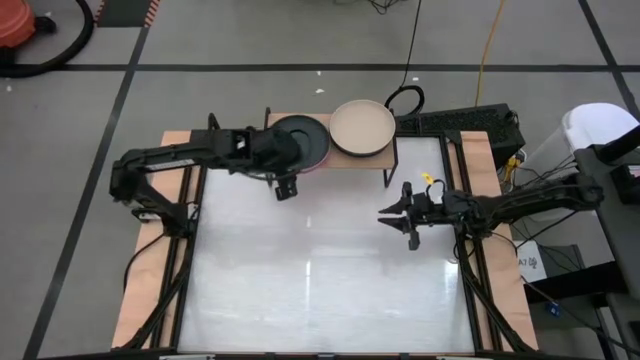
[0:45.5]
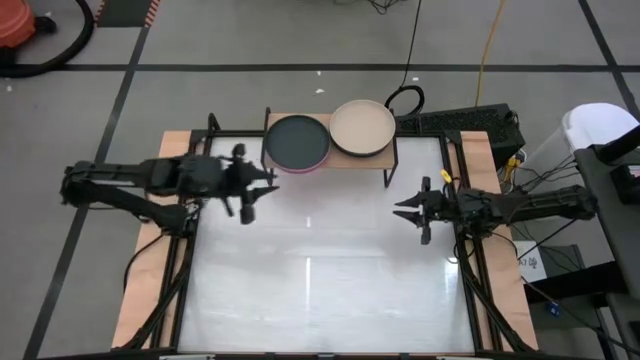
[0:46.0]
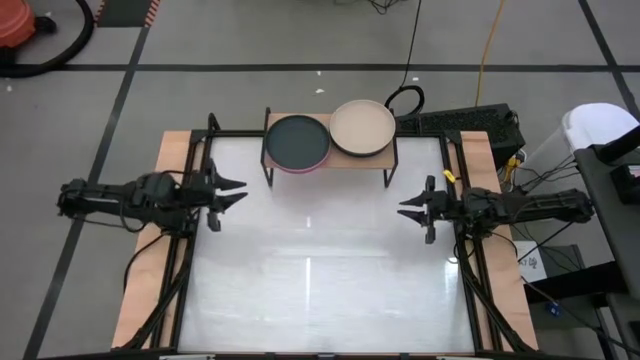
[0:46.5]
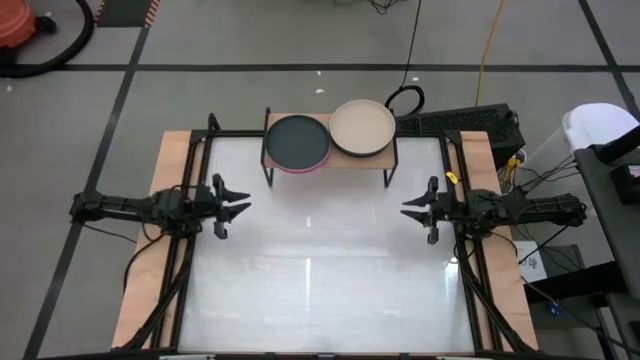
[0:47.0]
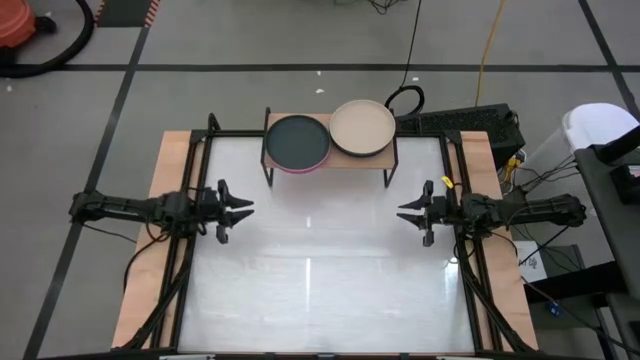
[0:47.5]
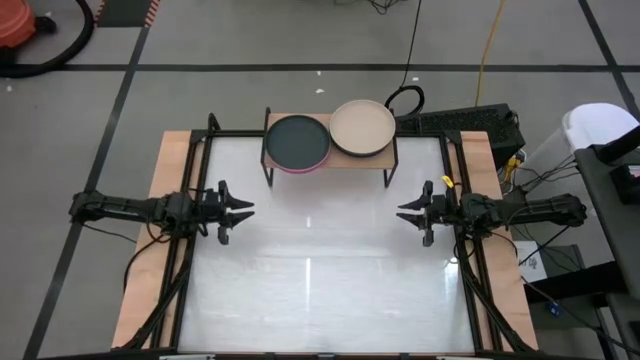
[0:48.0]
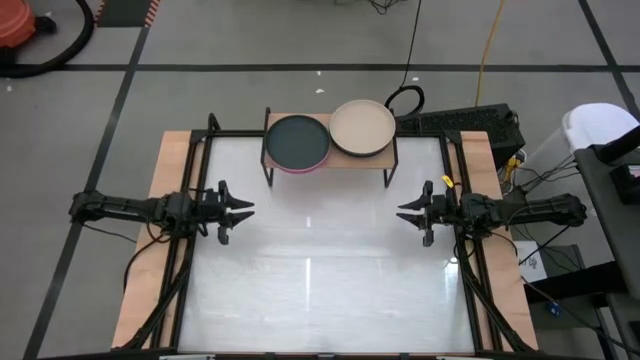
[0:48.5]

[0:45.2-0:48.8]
Task: Place and stack plates onto a shelf
Return to Home Position

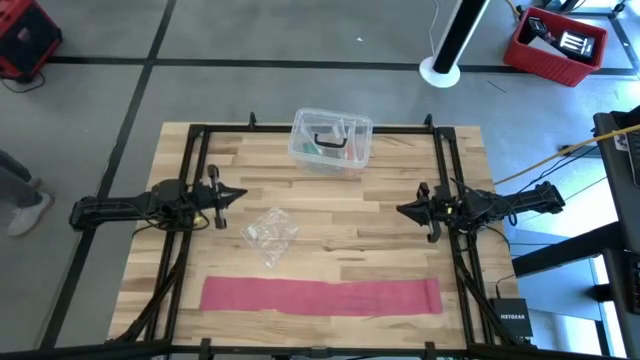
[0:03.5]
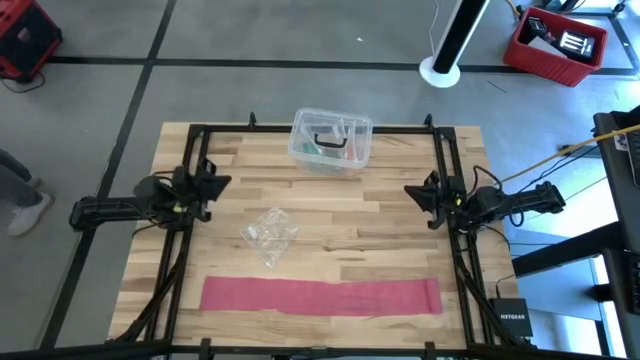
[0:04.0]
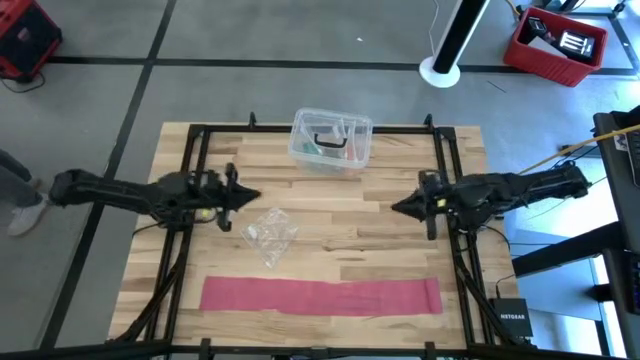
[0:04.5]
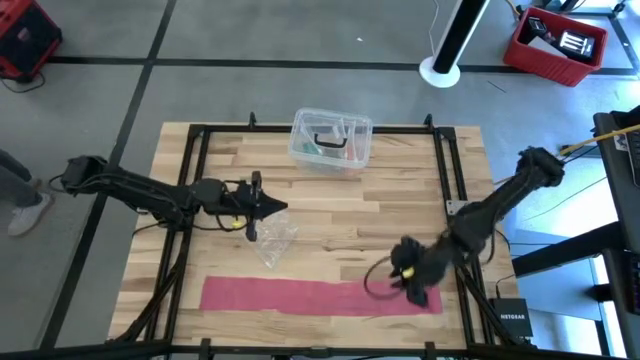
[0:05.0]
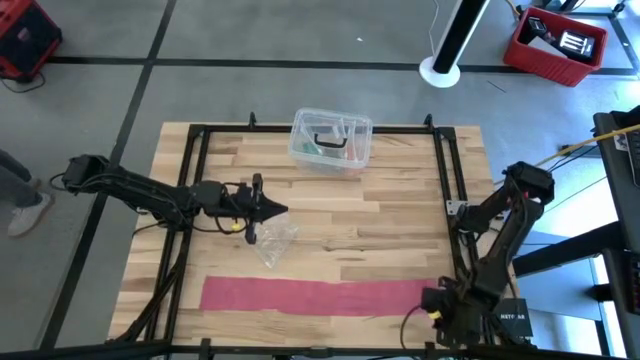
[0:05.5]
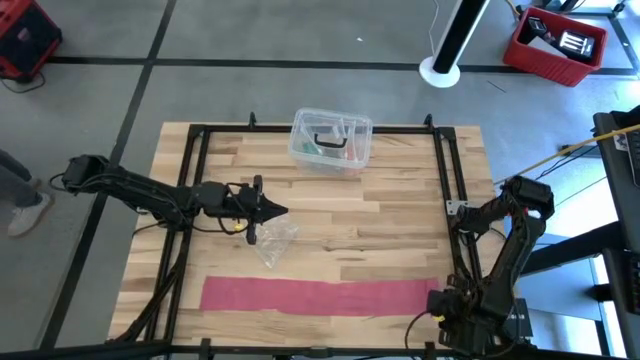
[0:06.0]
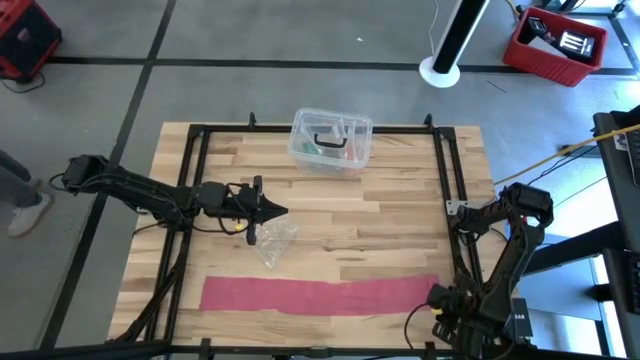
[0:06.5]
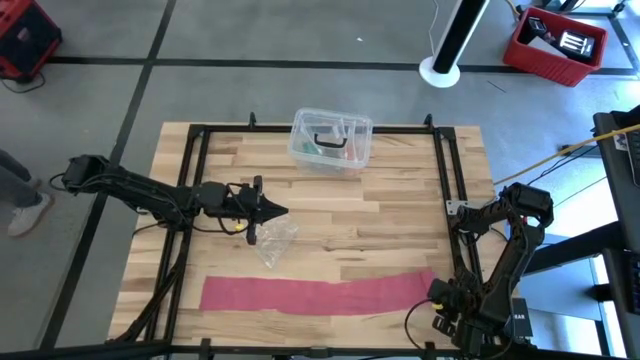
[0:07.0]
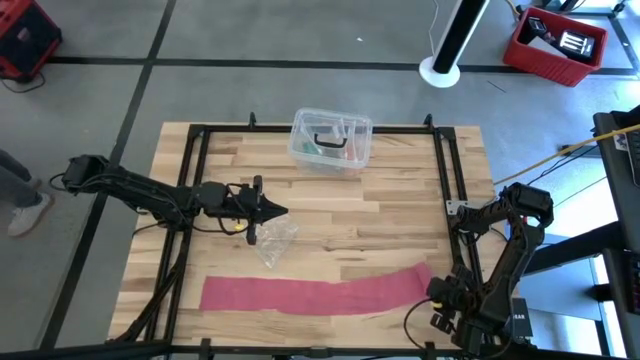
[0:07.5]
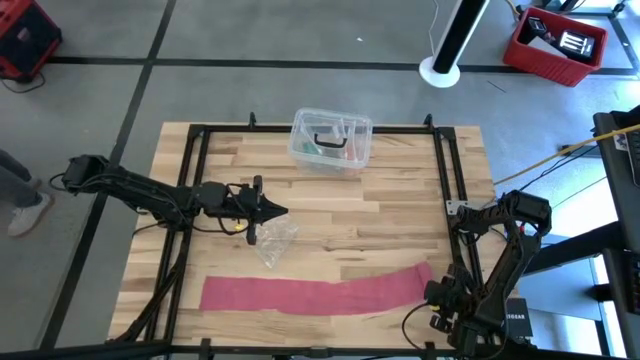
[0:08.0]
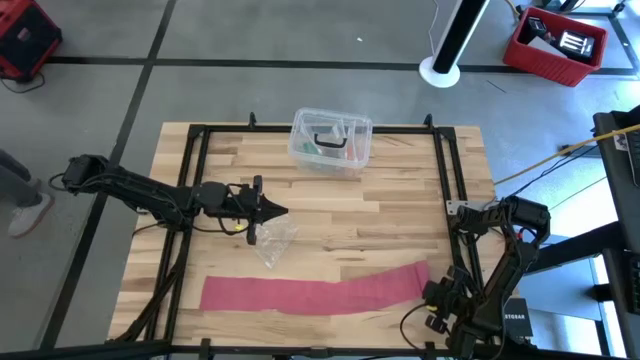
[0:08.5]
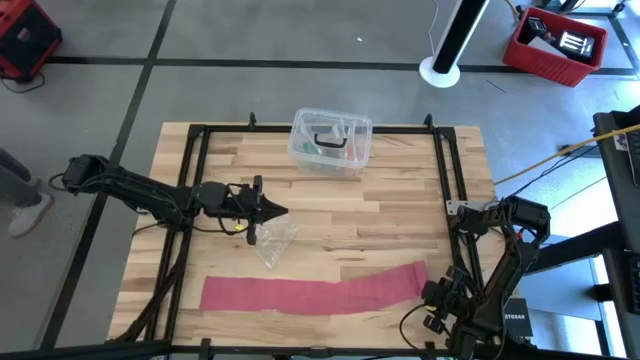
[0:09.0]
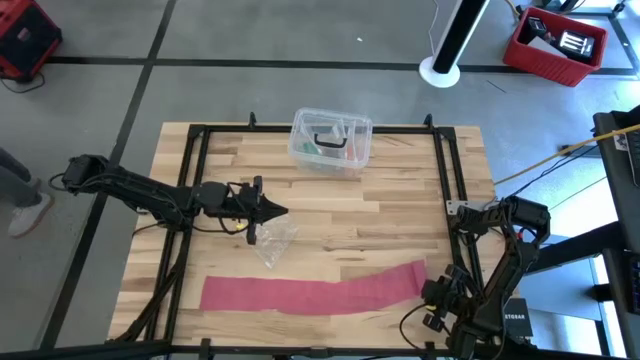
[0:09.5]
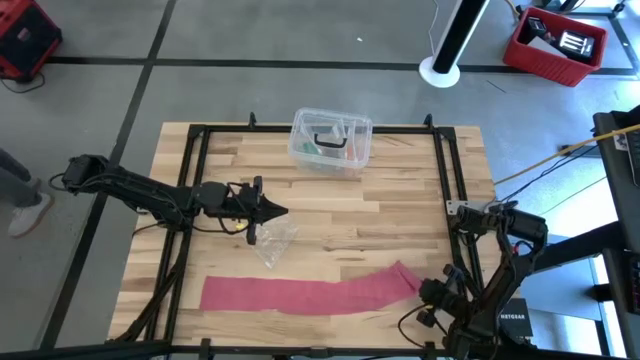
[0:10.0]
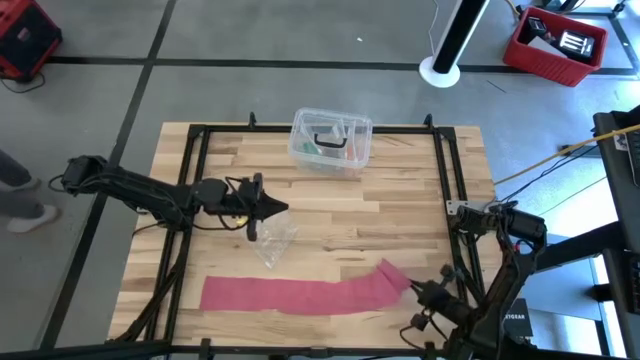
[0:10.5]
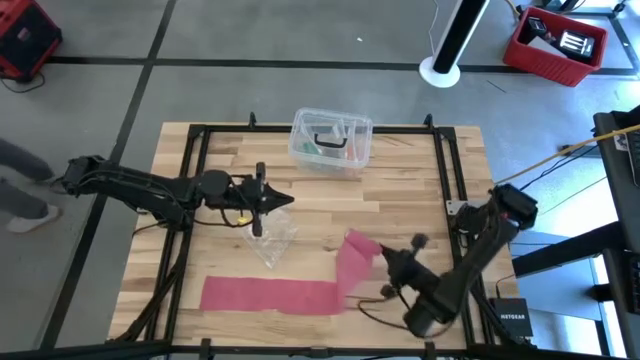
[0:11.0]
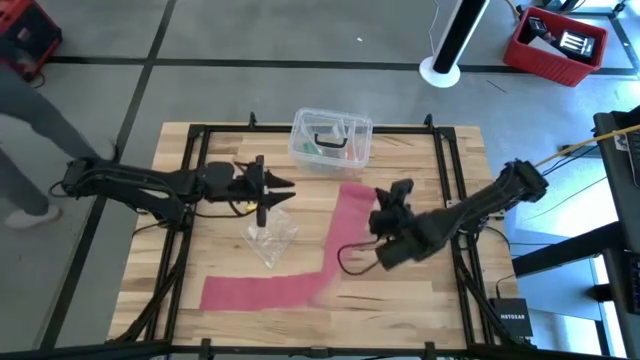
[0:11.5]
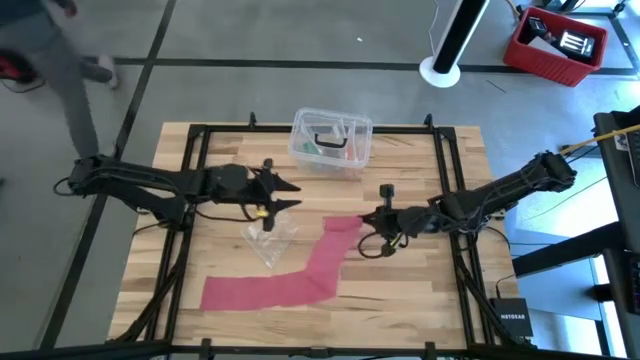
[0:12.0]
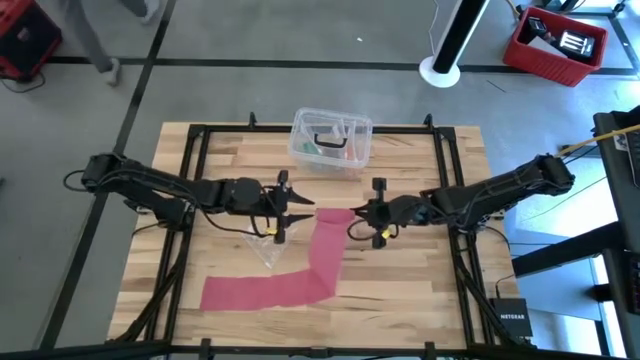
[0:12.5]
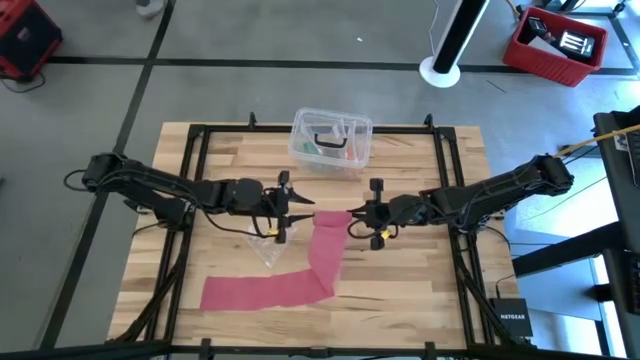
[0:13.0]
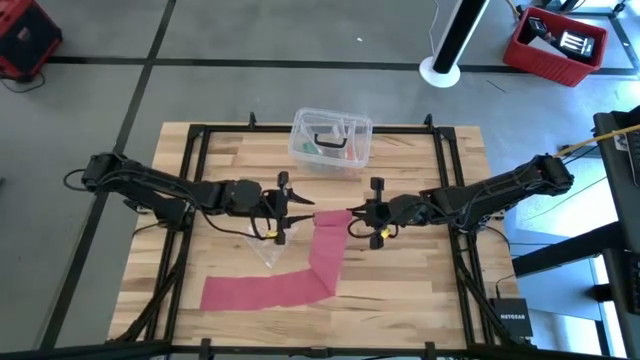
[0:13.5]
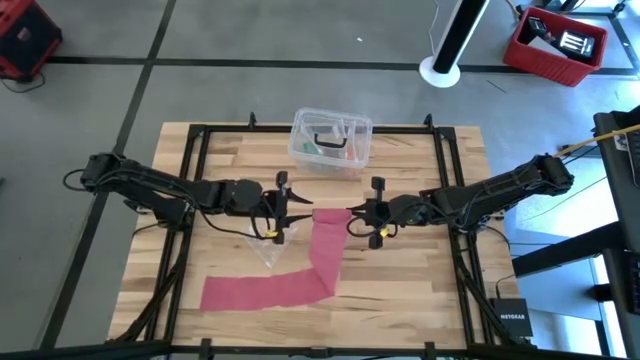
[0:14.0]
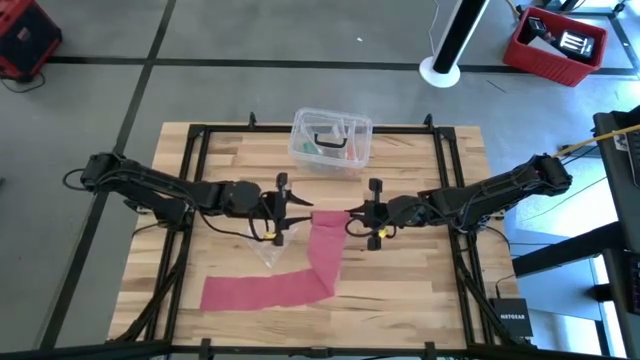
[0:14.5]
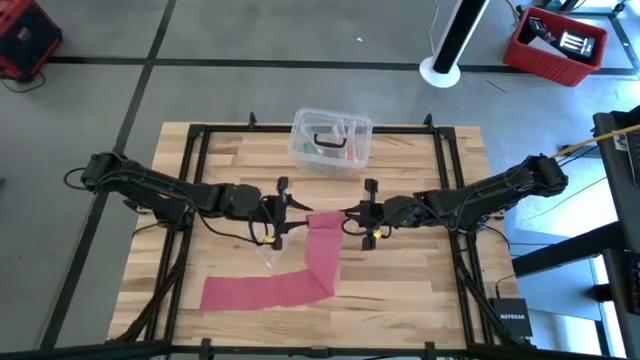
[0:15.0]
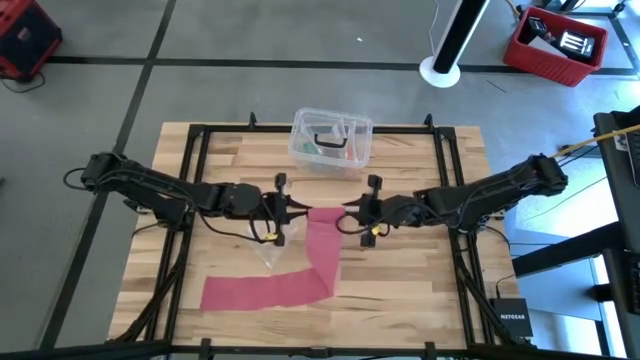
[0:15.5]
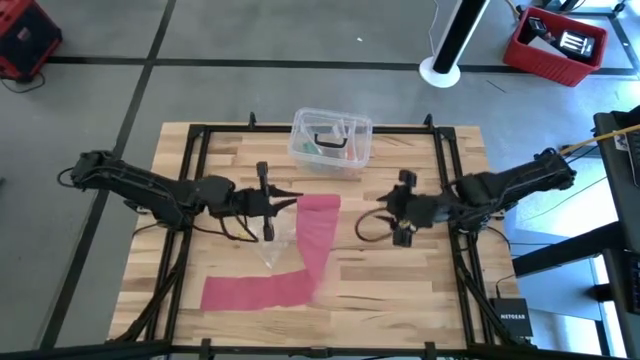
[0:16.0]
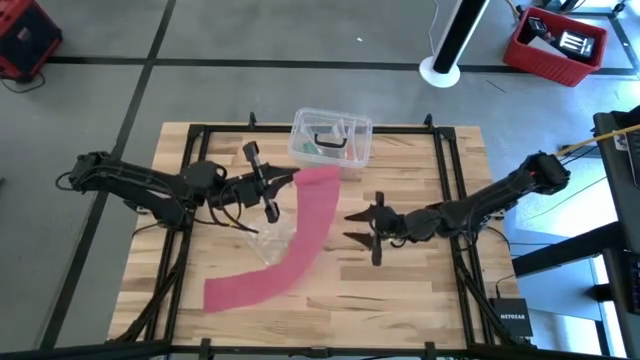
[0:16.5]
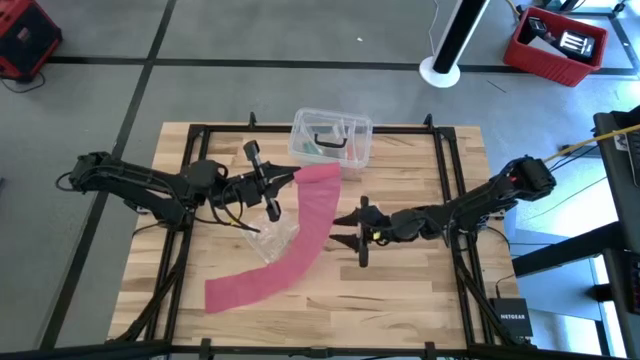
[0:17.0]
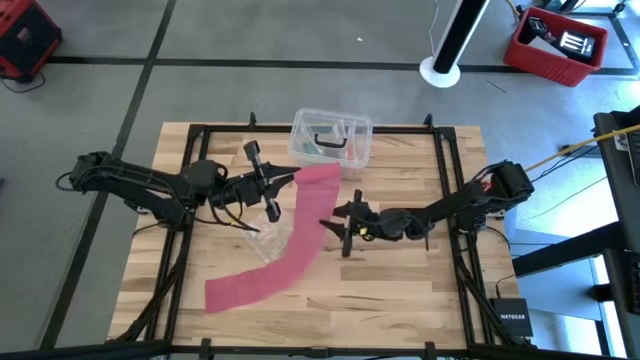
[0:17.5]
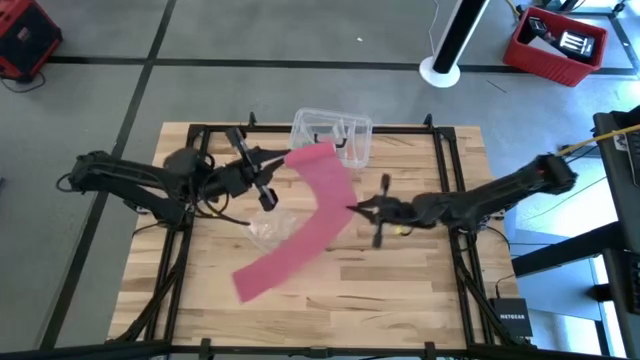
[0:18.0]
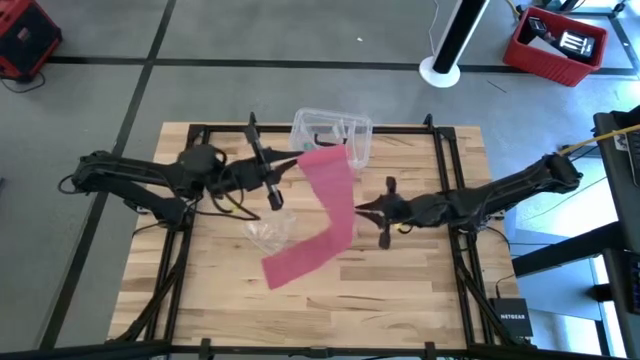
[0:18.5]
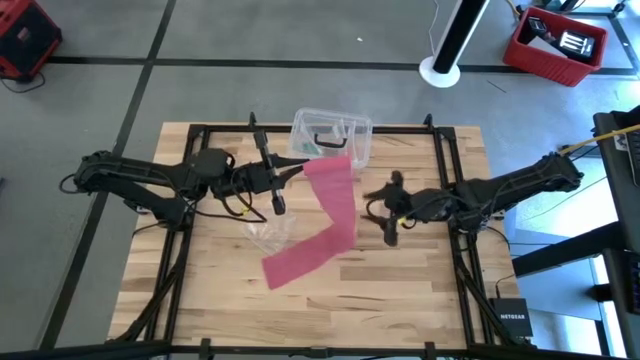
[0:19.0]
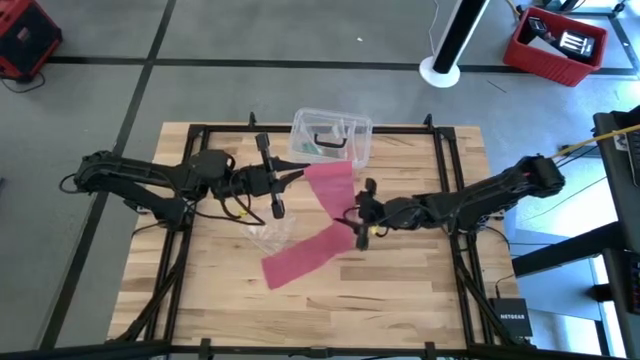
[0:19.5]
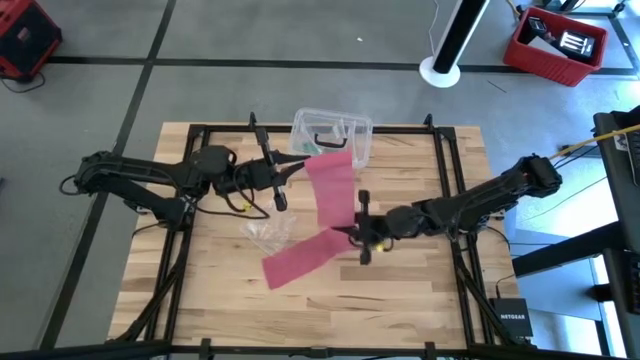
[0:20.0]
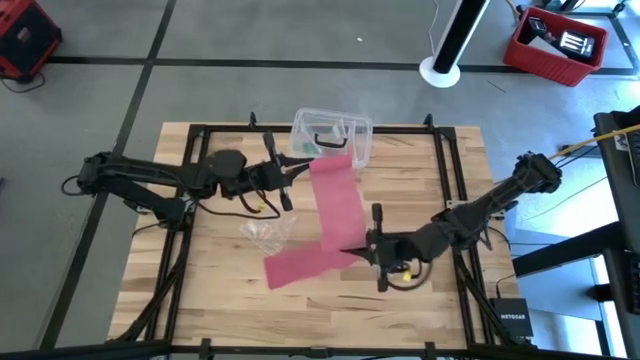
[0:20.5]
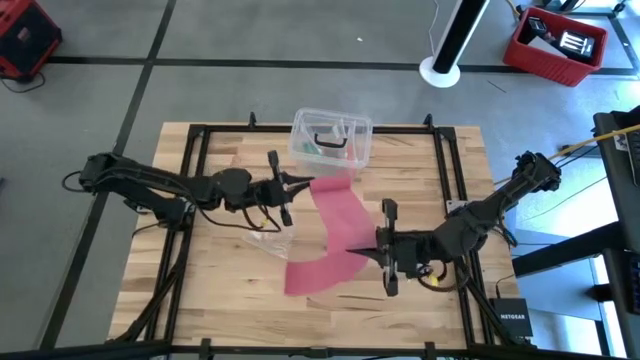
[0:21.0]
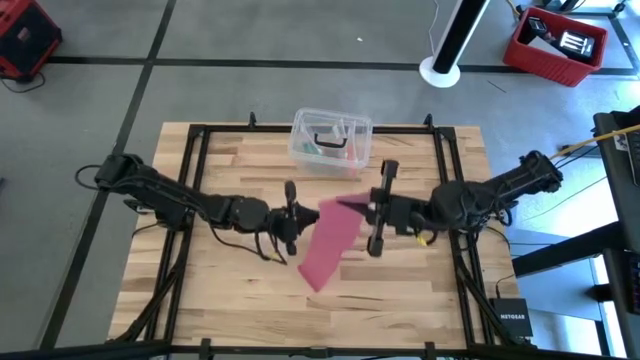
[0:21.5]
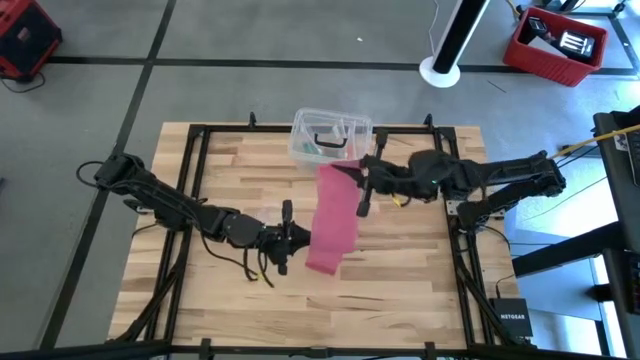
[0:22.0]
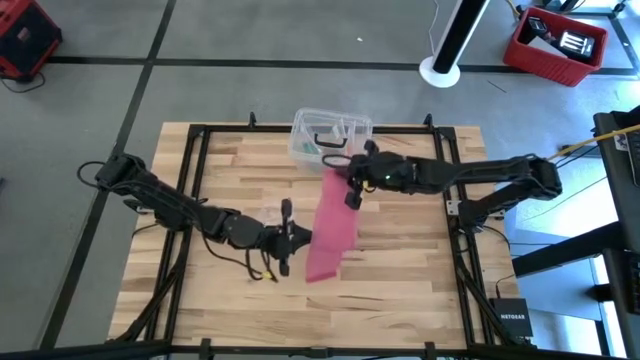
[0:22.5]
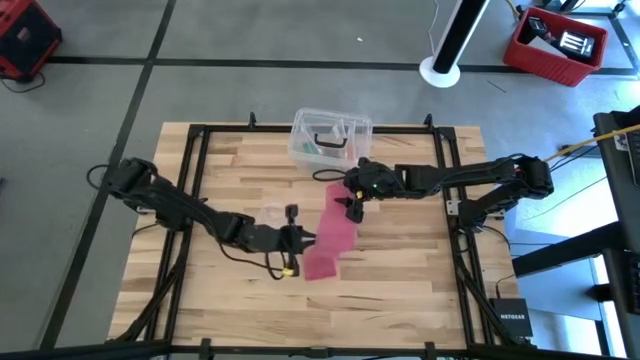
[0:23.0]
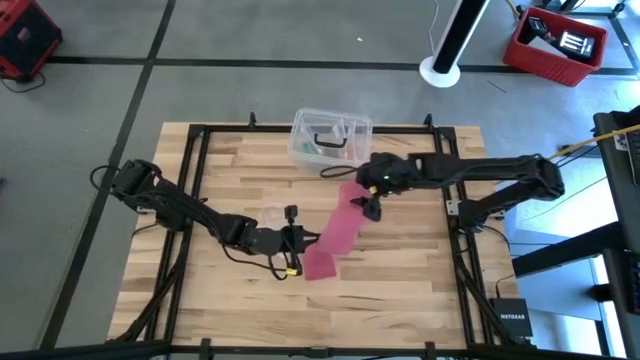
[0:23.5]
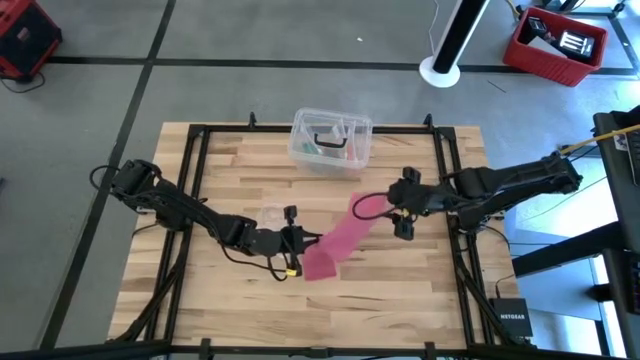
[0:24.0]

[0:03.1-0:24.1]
Task: Roll bandage
Roll the pink bandage
